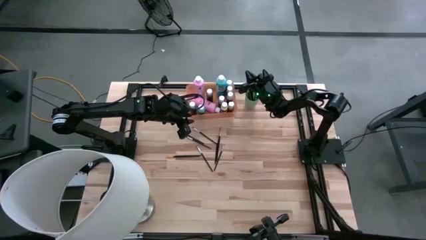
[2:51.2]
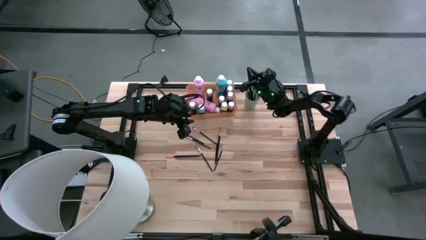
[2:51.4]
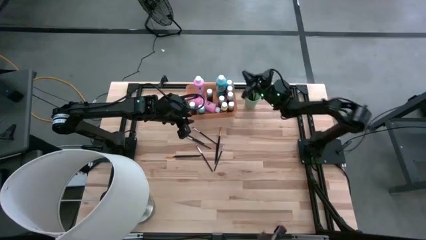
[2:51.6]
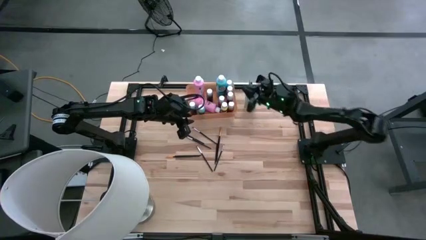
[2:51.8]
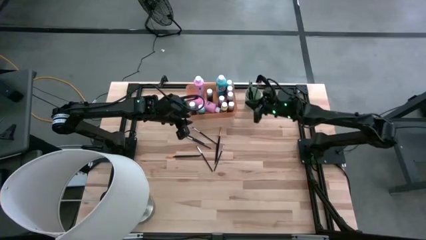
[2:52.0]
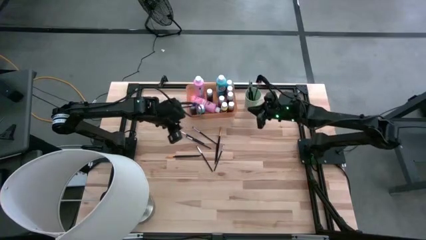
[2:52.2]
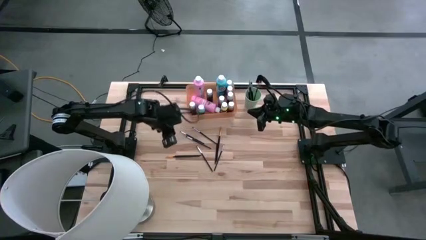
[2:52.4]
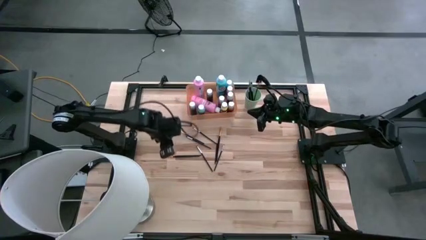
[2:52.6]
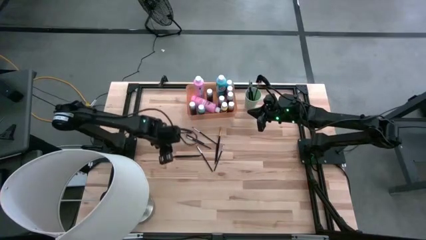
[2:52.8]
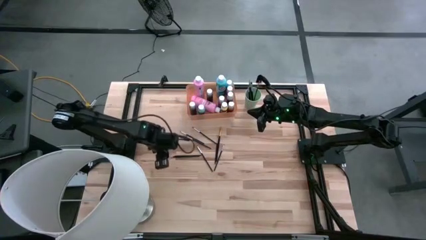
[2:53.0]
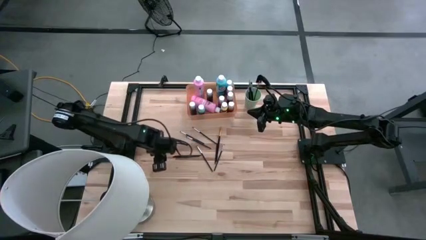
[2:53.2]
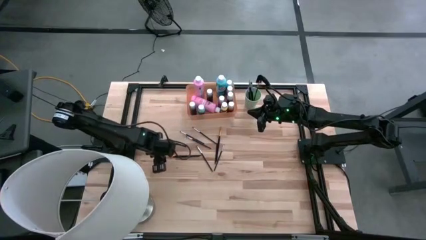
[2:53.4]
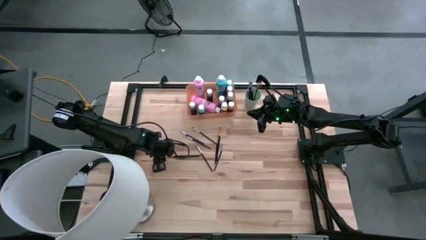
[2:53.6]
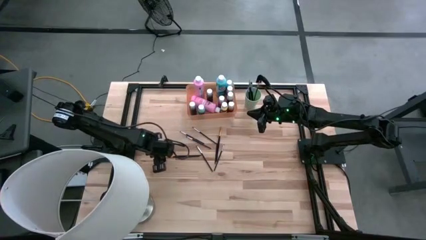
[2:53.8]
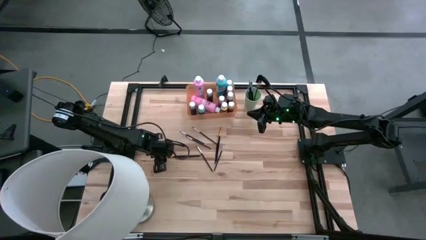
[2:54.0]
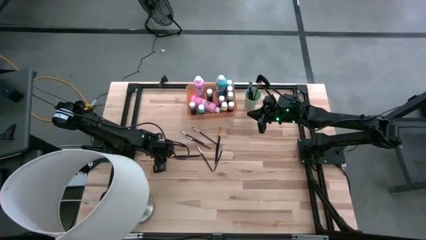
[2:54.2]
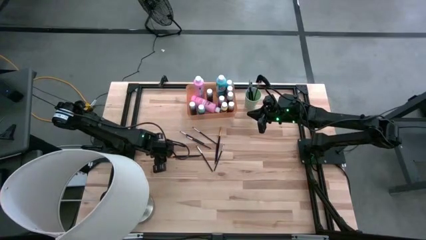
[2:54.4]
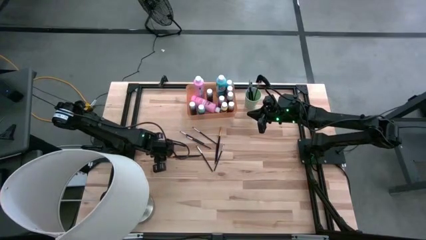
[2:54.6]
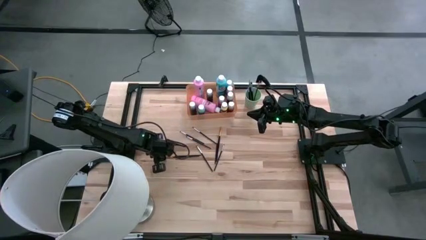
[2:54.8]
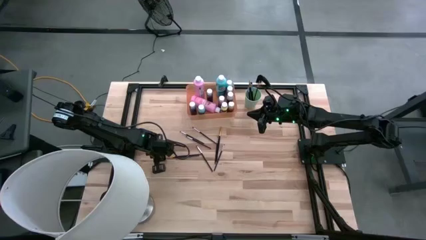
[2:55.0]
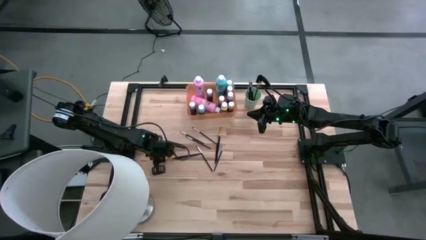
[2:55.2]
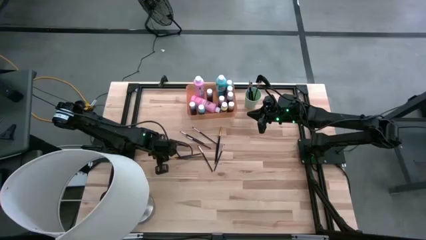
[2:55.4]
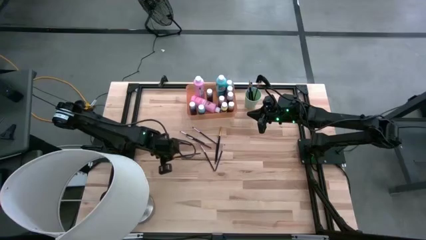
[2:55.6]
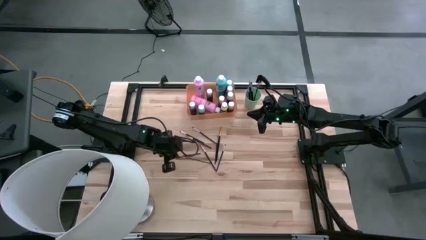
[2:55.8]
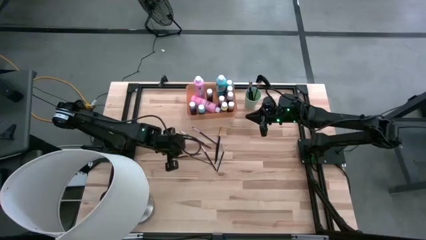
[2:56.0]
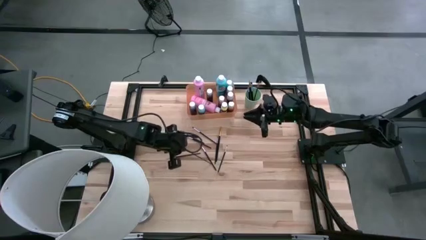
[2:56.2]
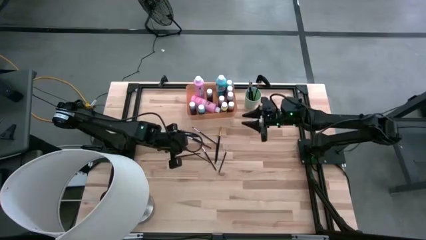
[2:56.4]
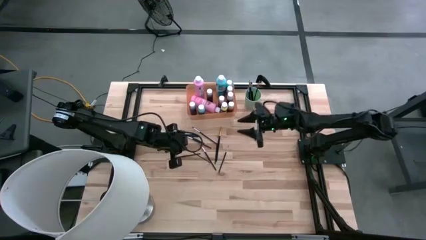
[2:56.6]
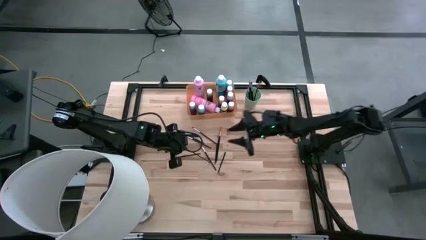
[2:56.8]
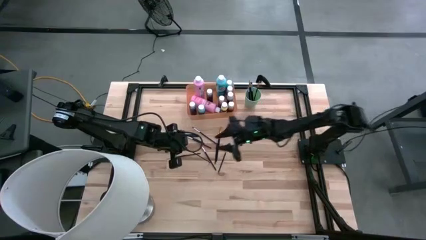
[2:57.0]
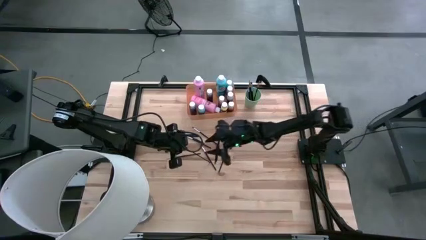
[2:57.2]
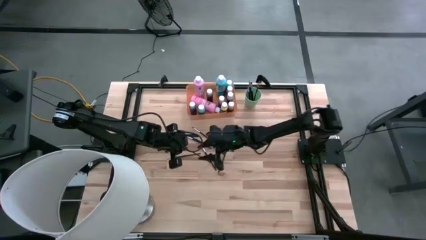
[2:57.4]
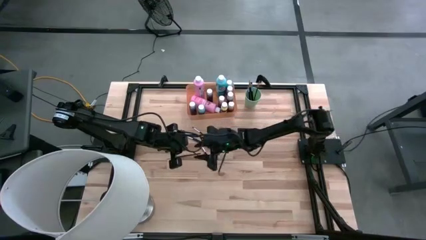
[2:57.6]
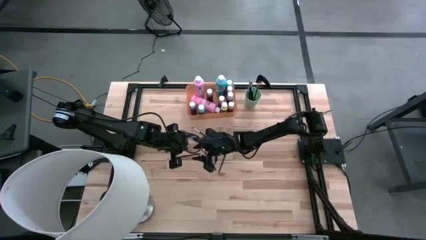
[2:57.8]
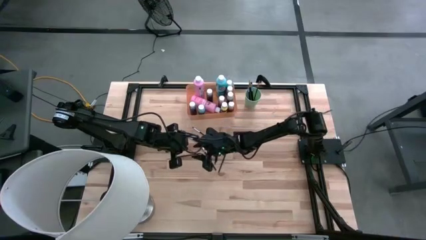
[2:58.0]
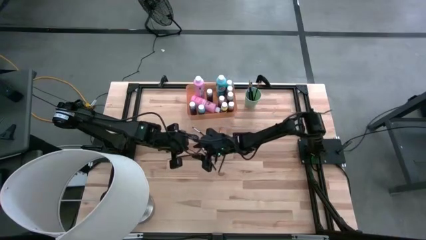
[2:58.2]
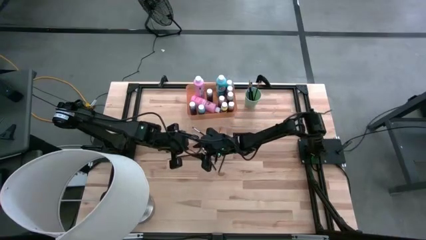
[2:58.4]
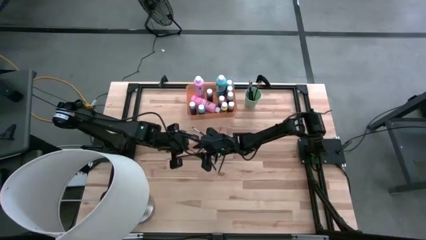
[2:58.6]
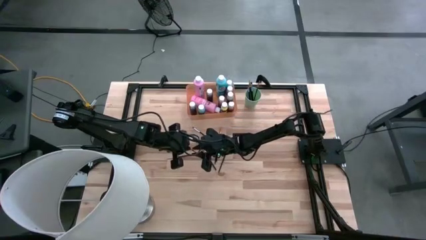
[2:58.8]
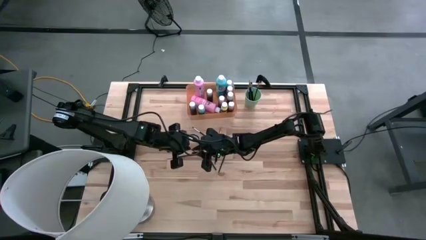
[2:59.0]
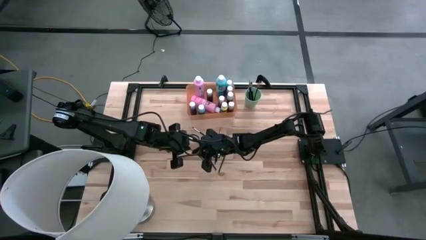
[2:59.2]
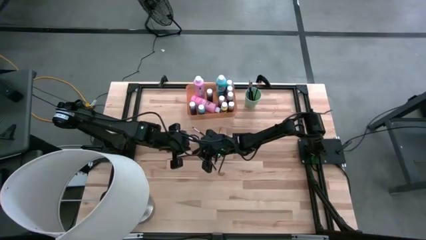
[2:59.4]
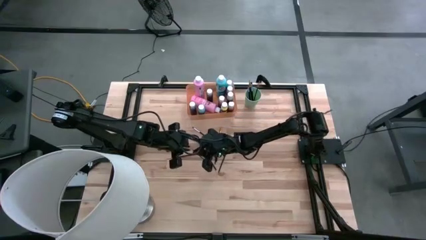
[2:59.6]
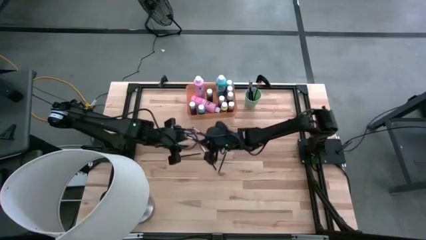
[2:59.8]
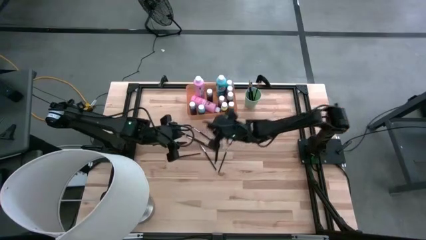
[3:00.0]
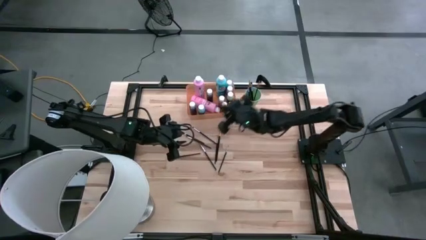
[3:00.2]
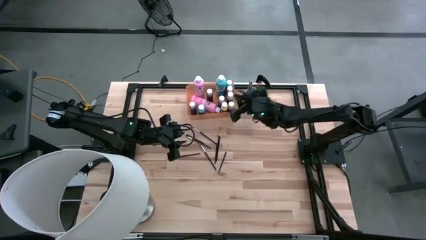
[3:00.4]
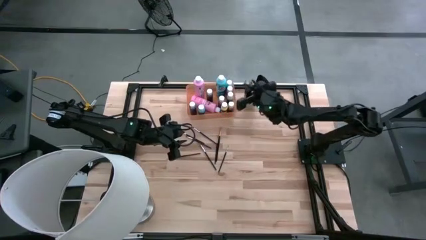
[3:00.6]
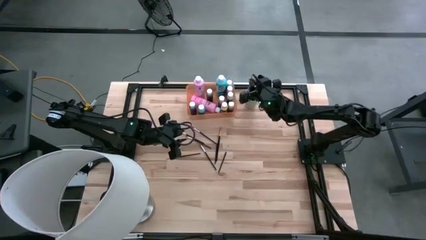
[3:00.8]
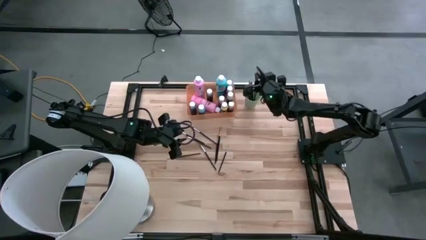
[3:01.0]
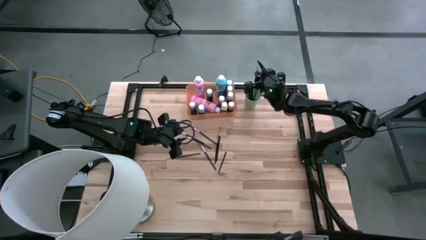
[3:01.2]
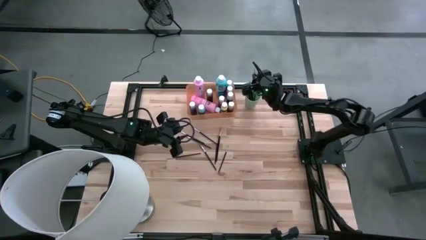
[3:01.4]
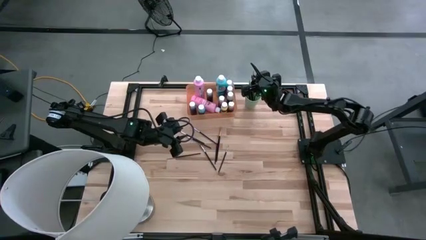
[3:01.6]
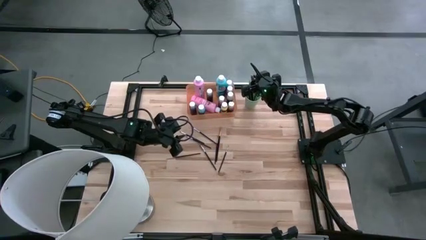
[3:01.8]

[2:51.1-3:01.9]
Task: Pick & Place Paint Supplies
Put the gold paint brush into the green cup
